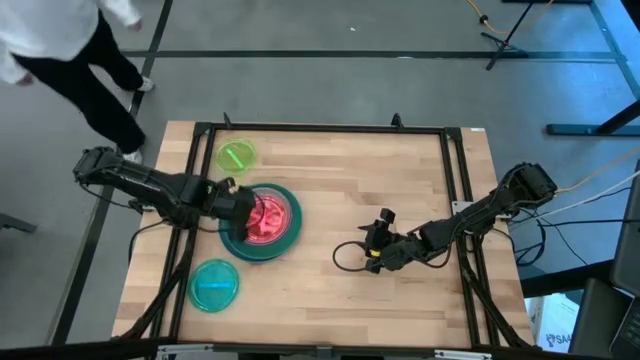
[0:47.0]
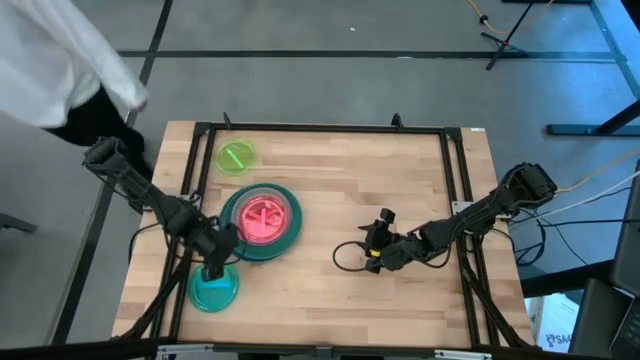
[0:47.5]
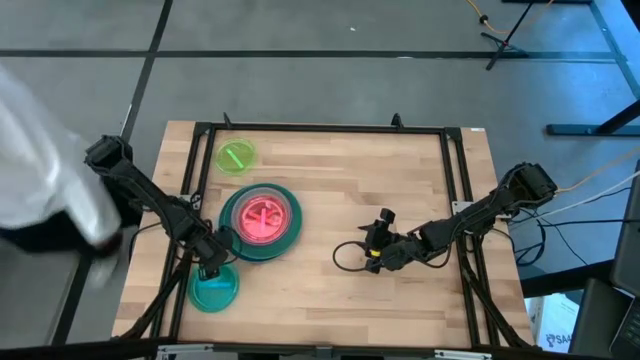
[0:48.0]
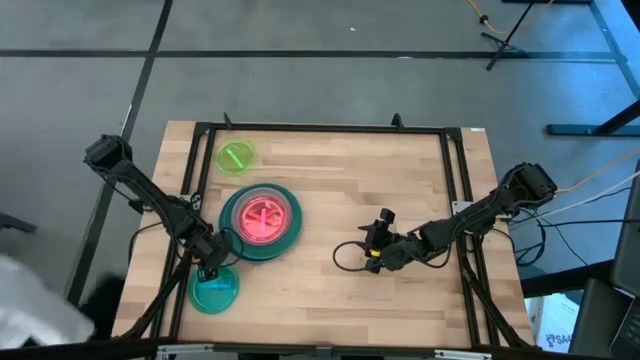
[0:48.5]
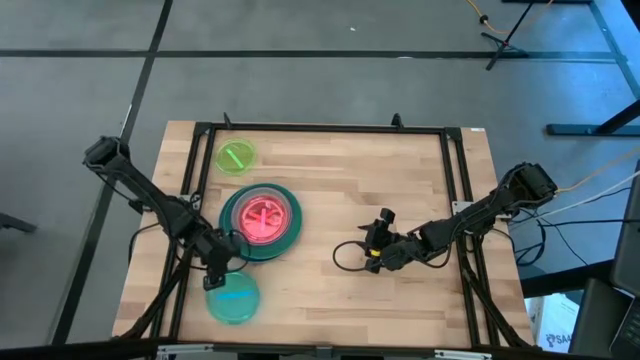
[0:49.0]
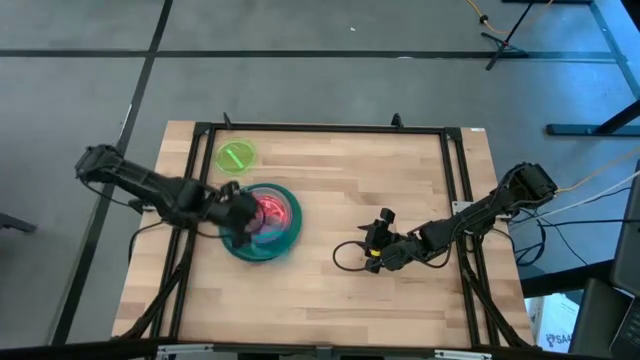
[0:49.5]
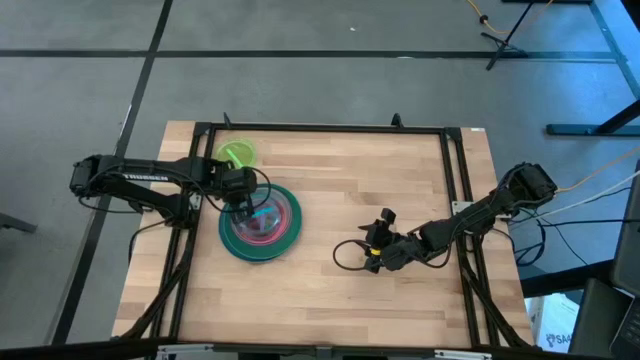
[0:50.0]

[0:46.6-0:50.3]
Task: Stack plastic plates
Stack the blue plate on top of the light pink plate

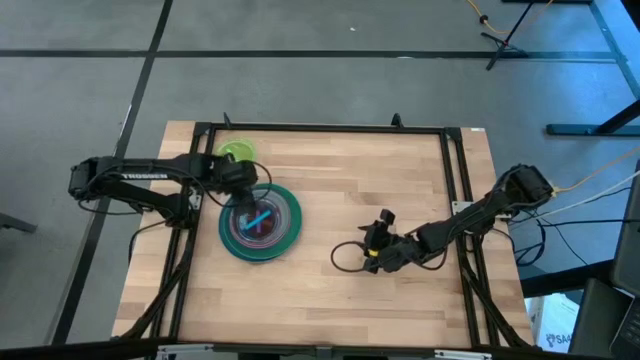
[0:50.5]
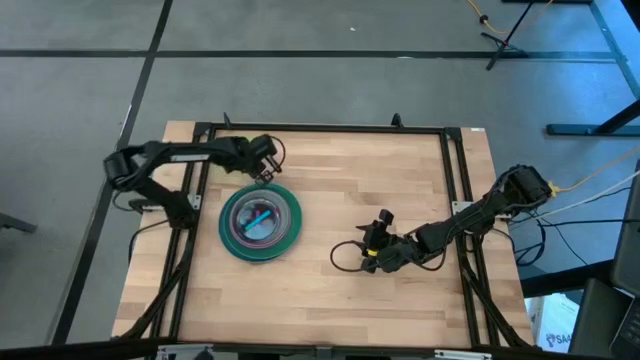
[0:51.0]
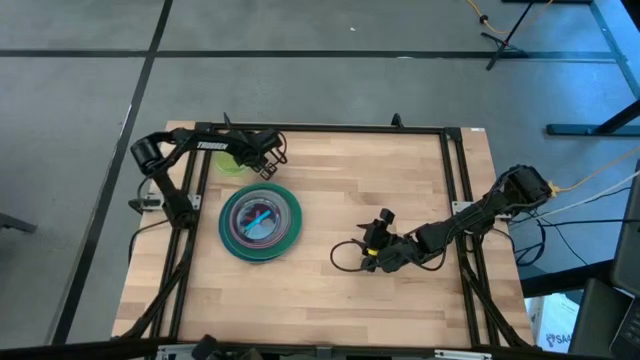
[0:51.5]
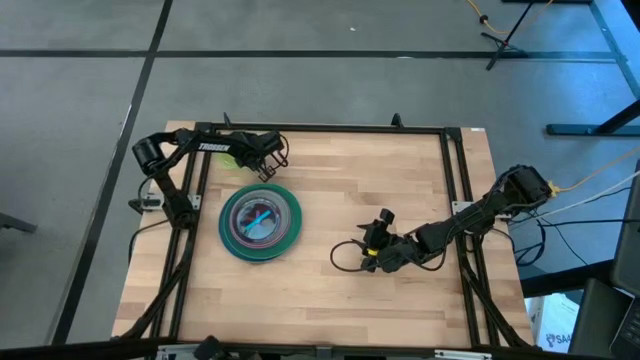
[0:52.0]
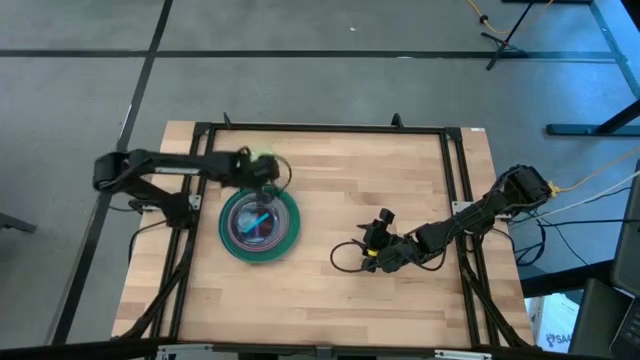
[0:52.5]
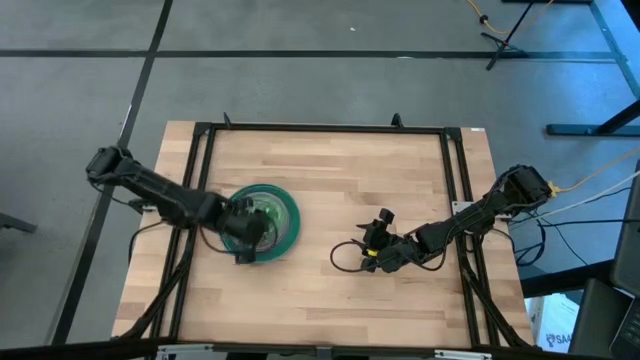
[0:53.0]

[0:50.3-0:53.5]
Stack the light green plate on top of the blue plate

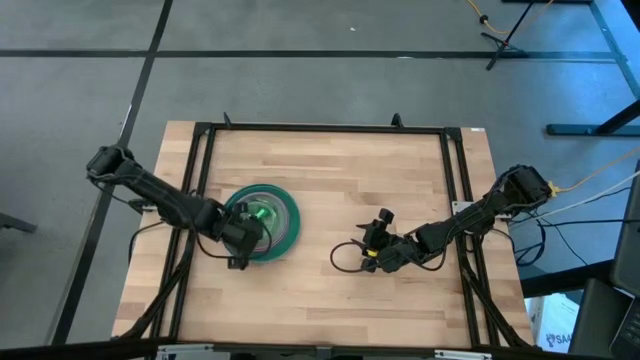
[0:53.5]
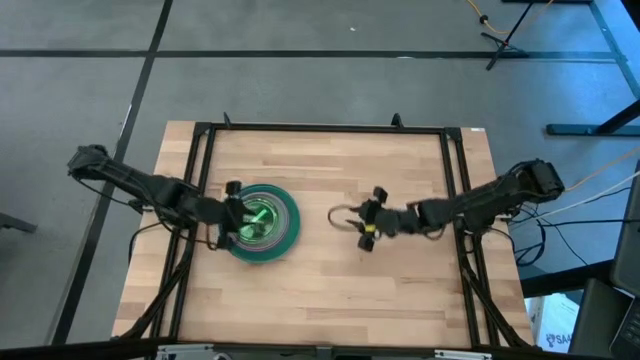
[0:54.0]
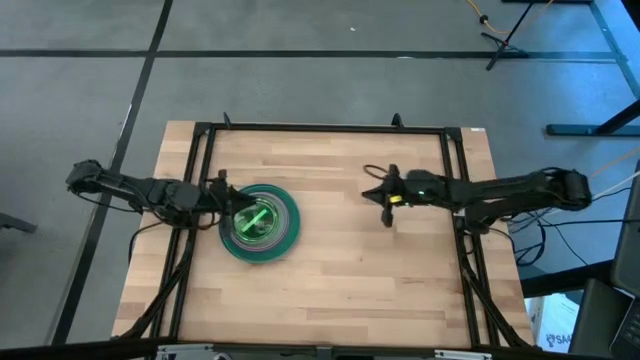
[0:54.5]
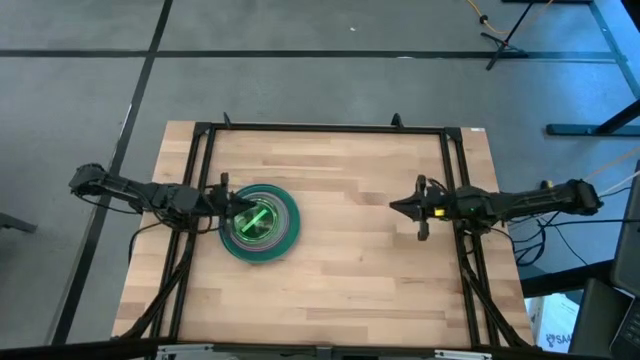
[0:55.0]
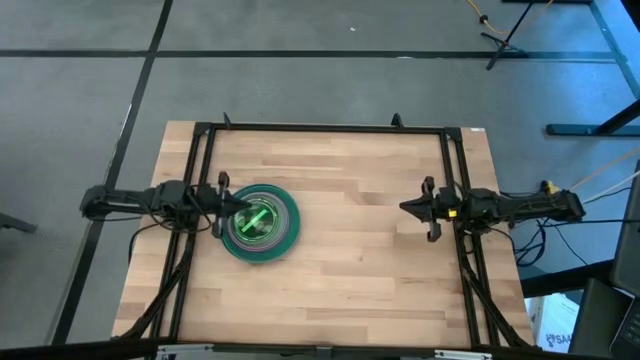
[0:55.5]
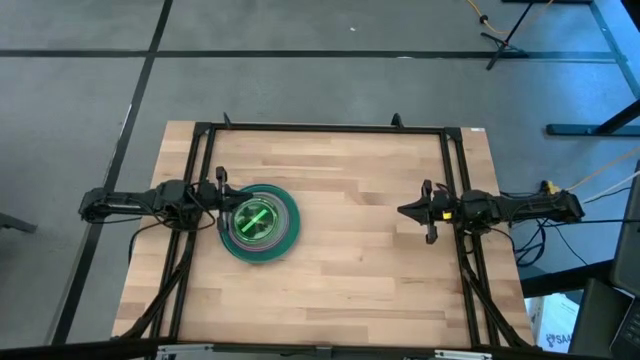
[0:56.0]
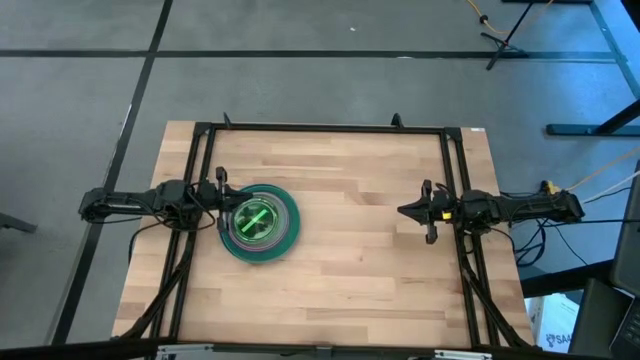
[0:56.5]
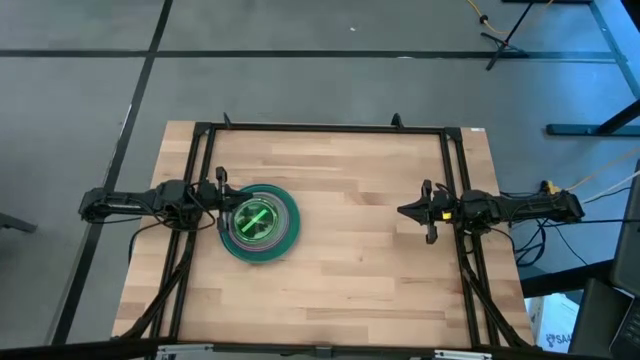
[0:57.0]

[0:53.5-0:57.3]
Return to Home Position

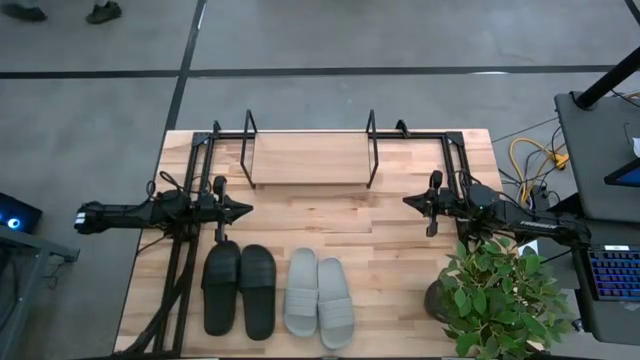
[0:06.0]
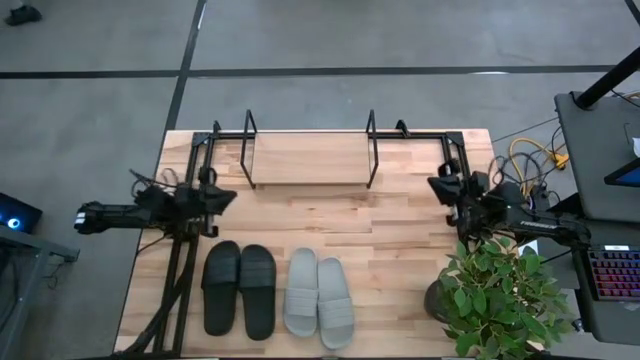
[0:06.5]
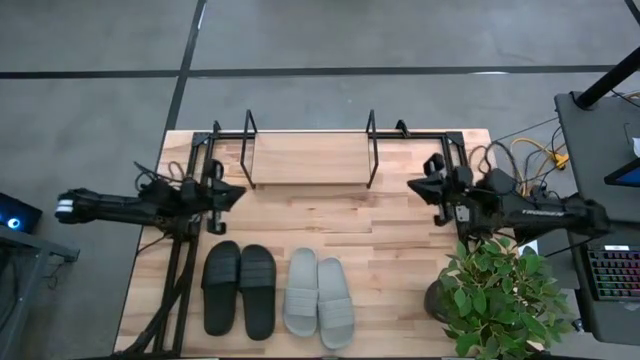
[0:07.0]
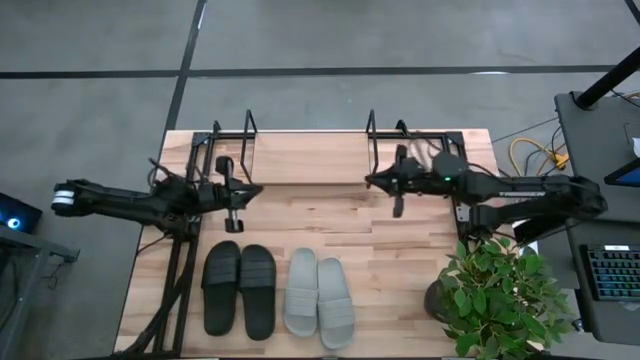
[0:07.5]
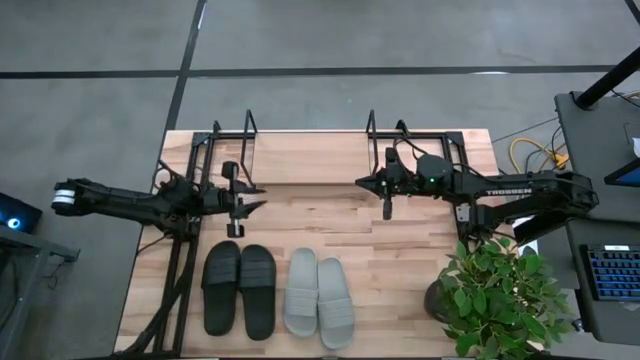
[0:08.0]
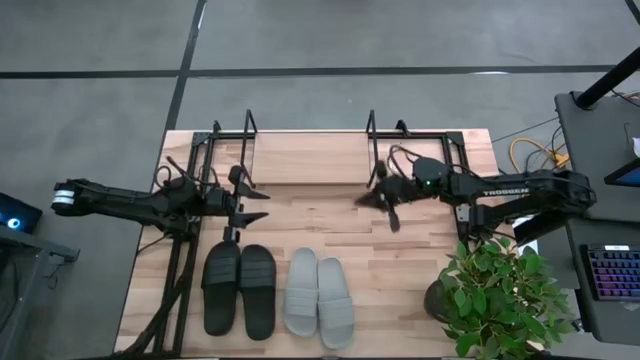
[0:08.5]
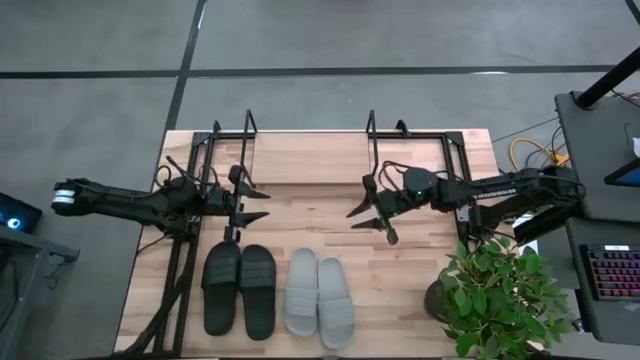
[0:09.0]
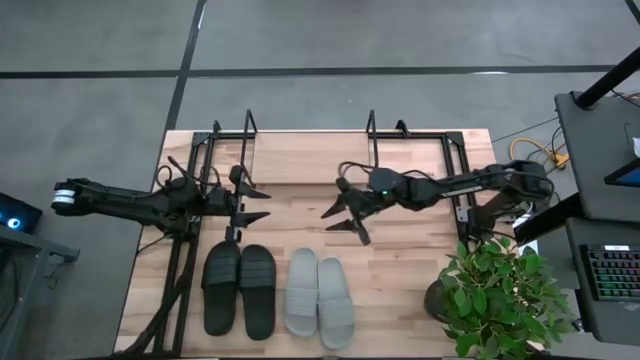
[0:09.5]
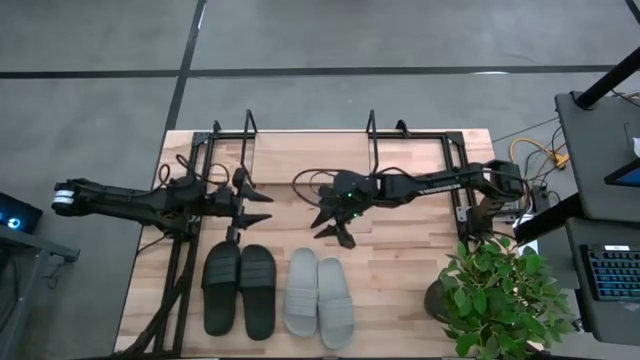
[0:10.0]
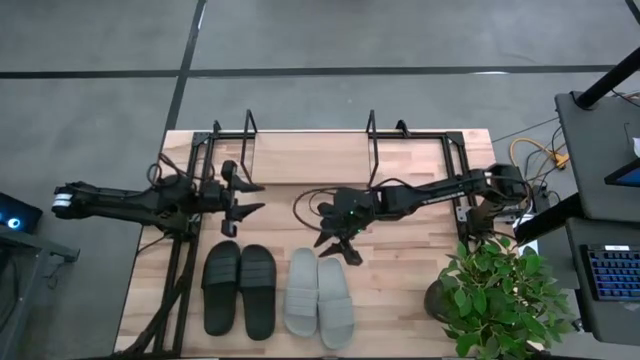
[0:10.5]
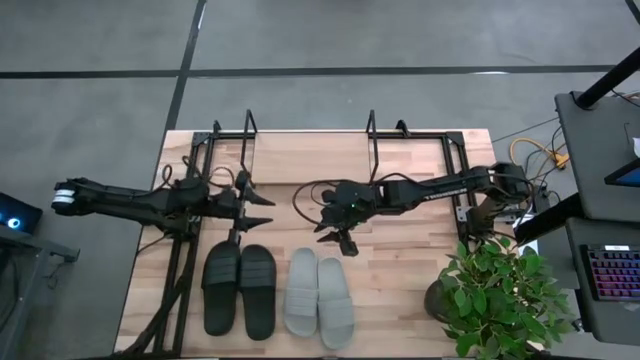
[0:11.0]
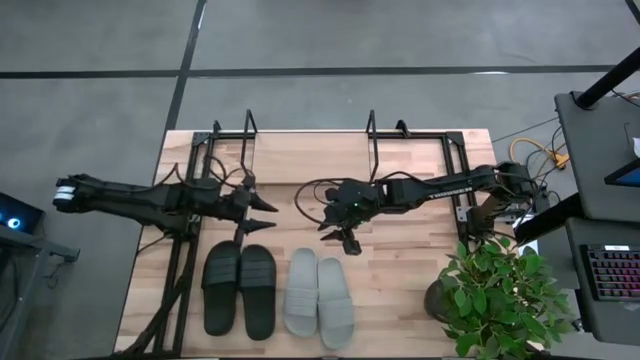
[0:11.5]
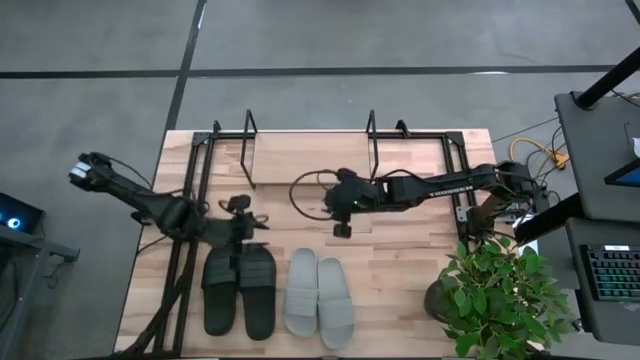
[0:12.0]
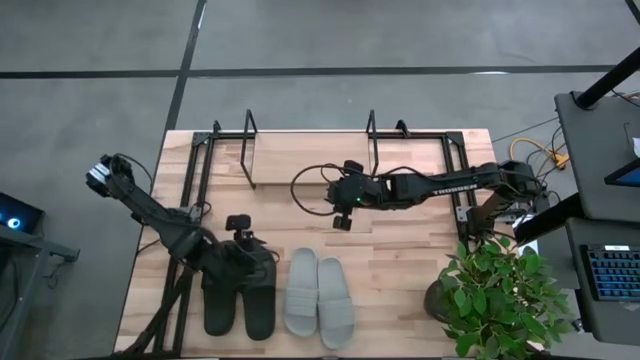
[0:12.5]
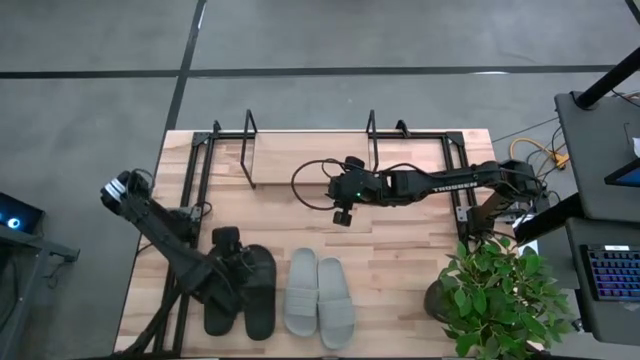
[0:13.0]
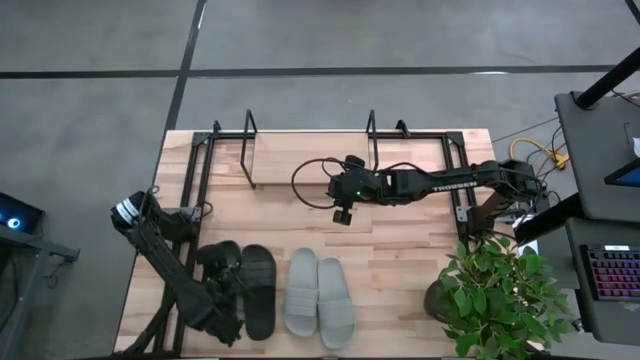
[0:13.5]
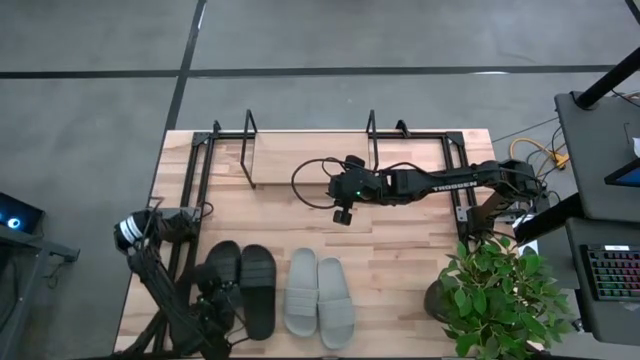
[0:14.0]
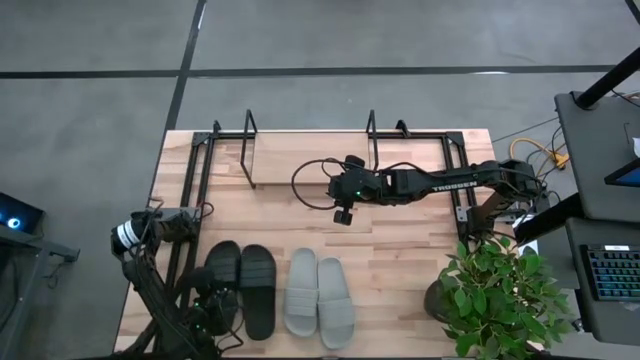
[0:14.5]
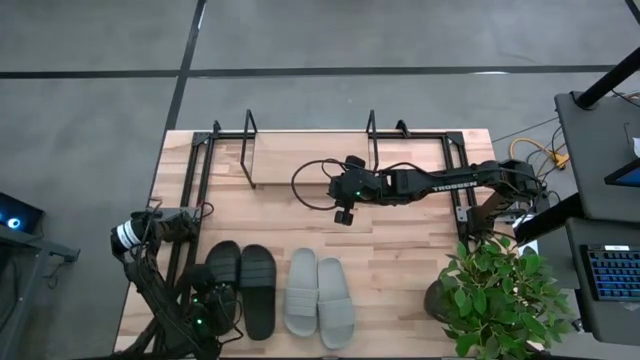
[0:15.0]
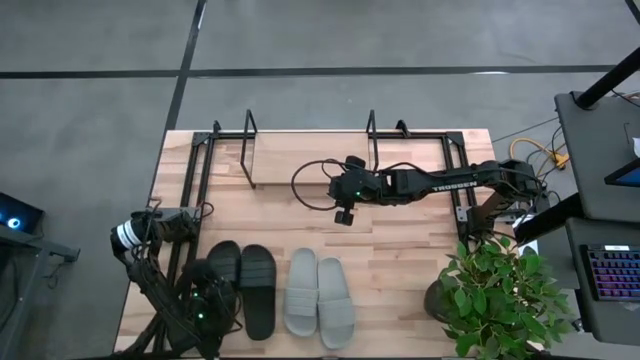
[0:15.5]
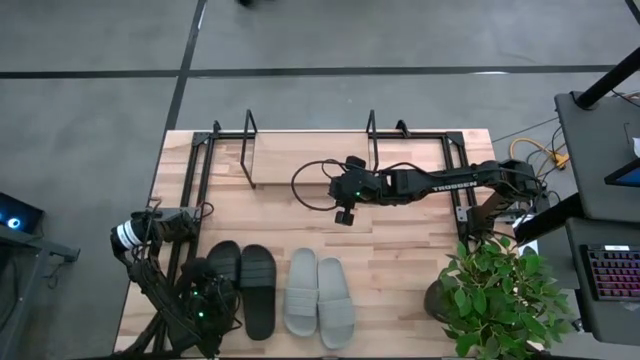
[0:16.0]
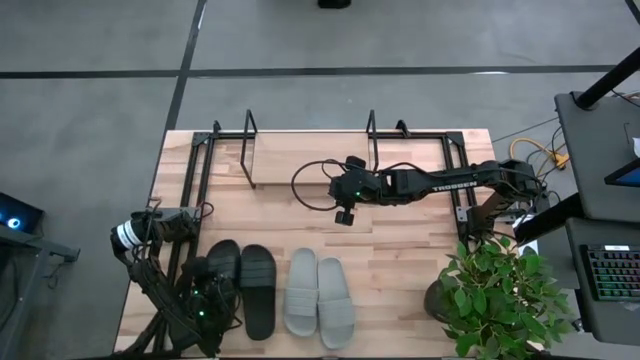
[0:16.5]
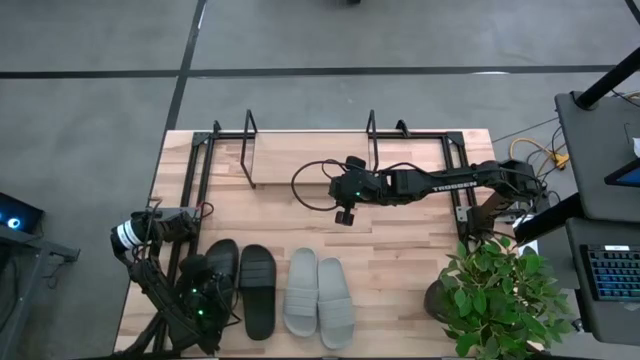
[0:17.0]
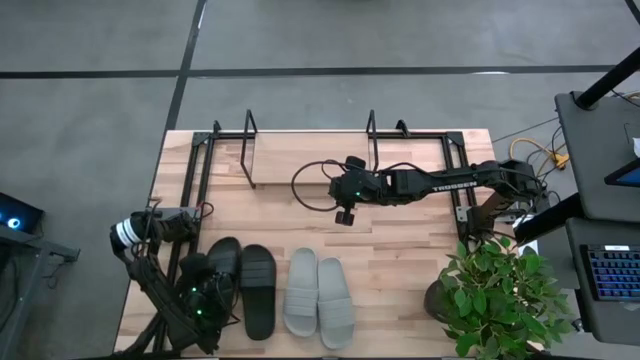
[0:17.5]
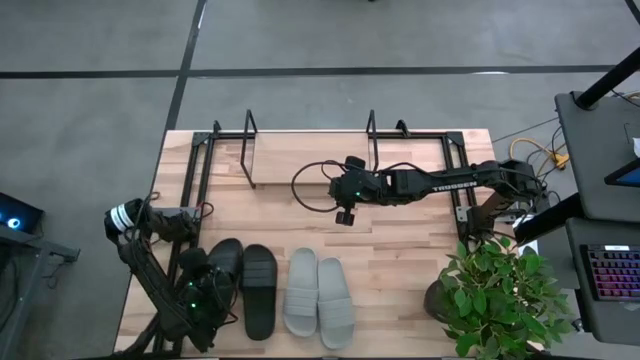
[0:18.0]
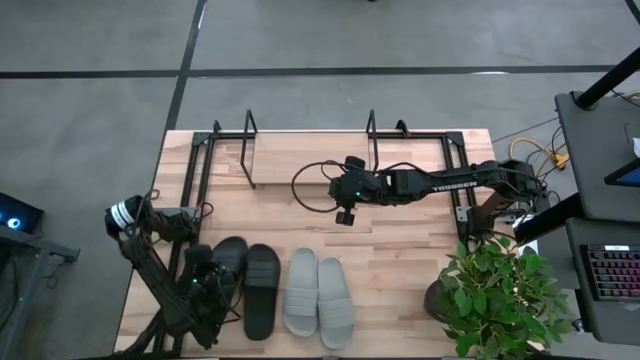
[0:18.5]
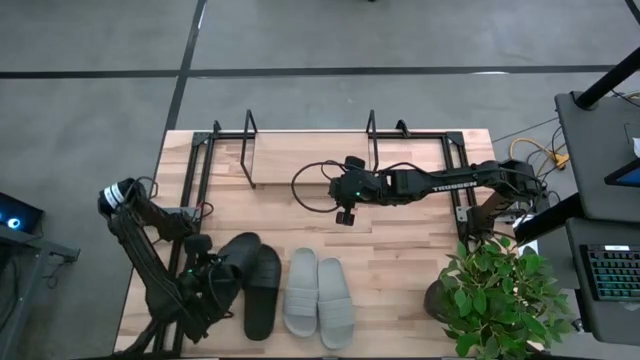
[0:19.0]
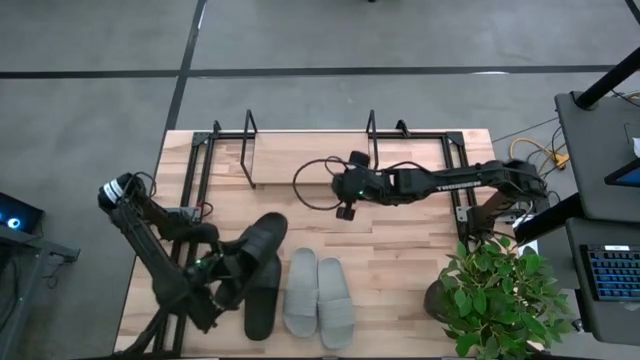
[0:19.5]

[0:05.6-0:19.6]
Task: Pick and place slides into the shelf
Put the left black slide on the shelf
